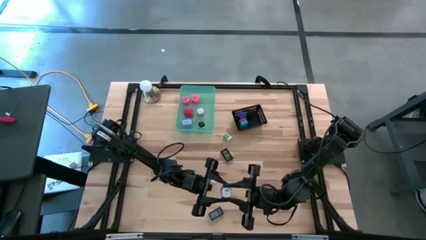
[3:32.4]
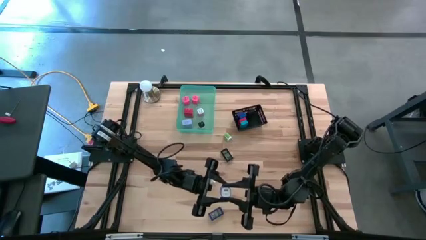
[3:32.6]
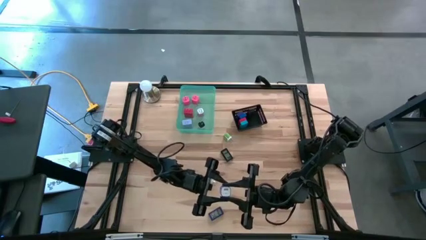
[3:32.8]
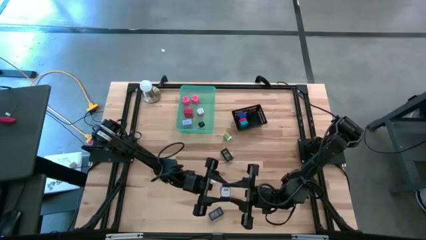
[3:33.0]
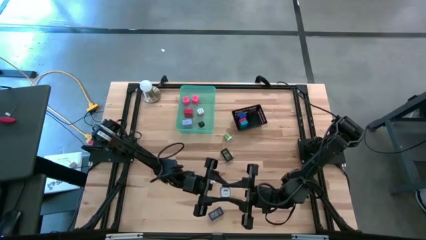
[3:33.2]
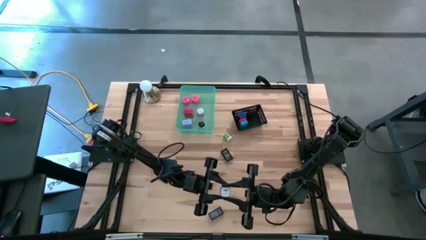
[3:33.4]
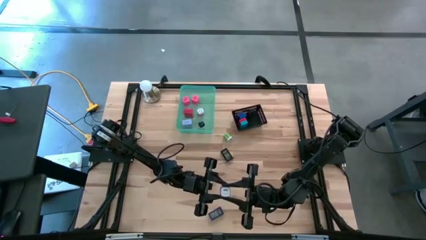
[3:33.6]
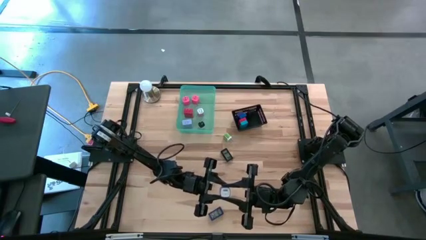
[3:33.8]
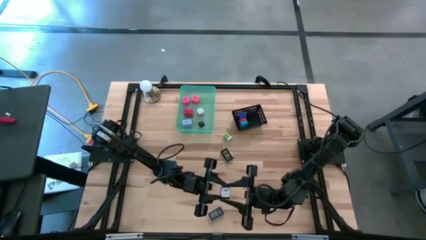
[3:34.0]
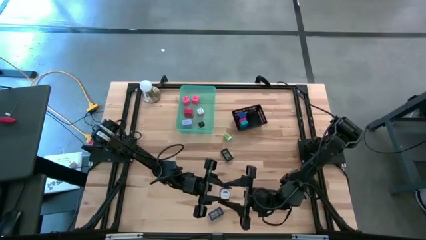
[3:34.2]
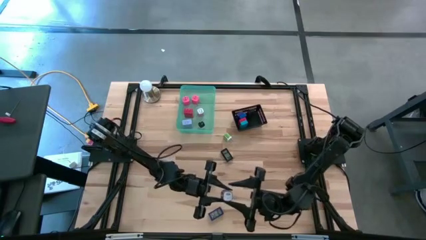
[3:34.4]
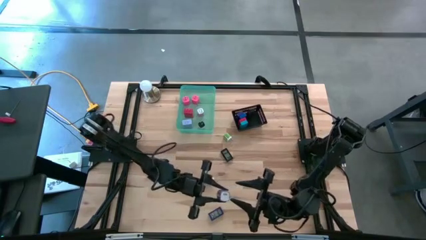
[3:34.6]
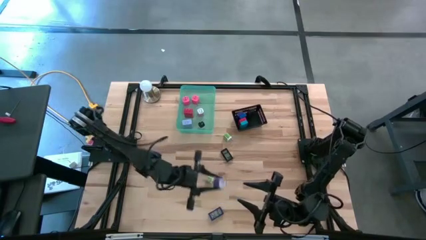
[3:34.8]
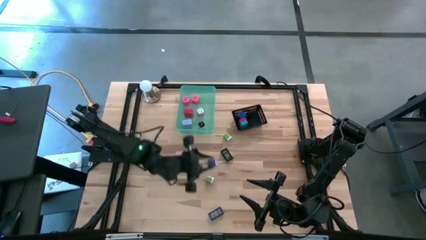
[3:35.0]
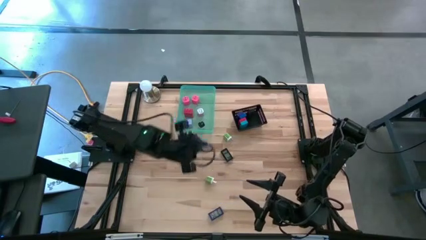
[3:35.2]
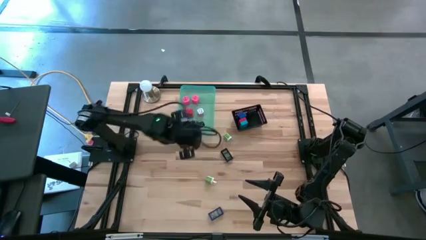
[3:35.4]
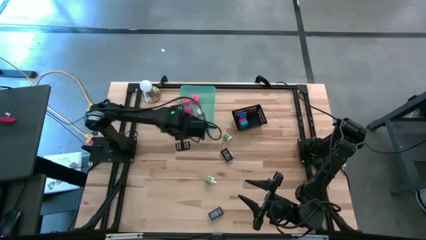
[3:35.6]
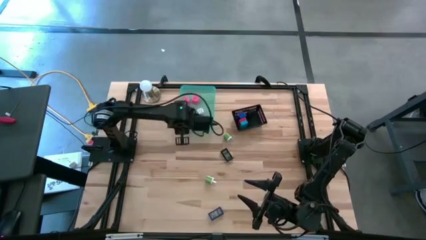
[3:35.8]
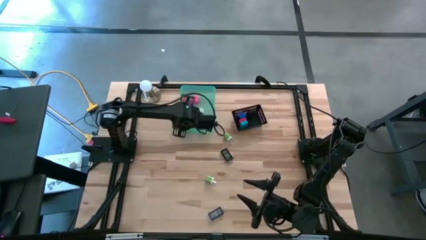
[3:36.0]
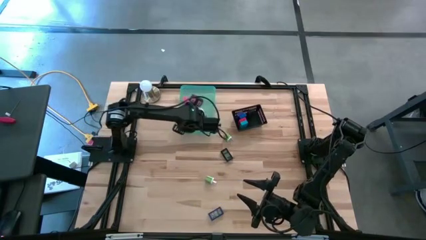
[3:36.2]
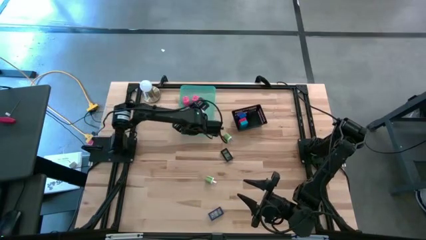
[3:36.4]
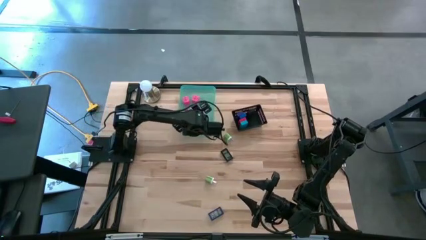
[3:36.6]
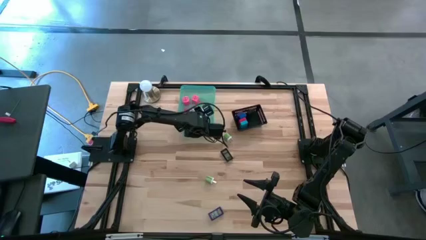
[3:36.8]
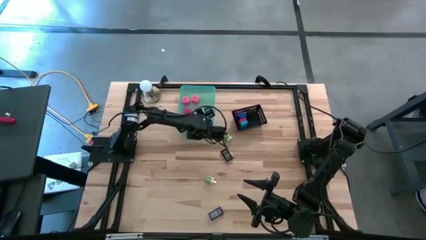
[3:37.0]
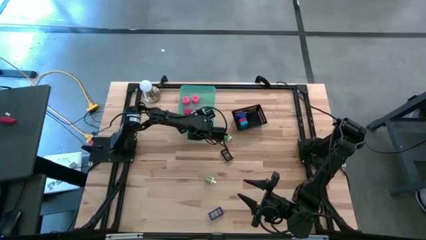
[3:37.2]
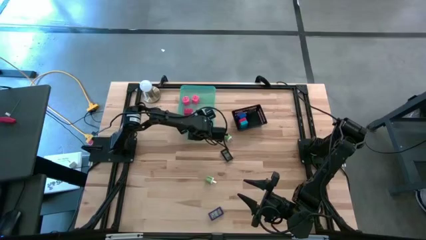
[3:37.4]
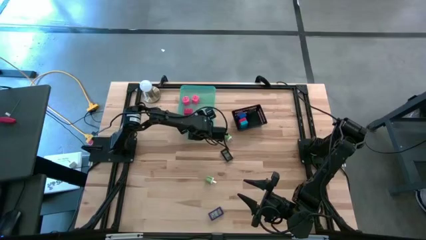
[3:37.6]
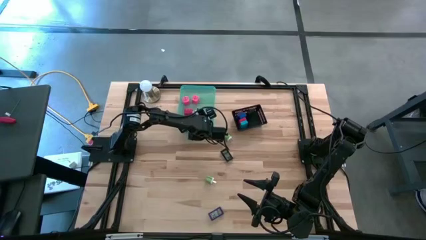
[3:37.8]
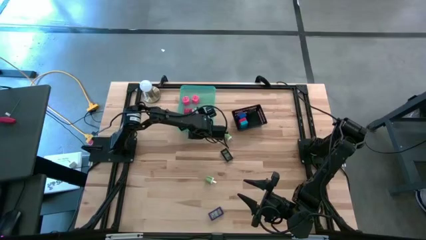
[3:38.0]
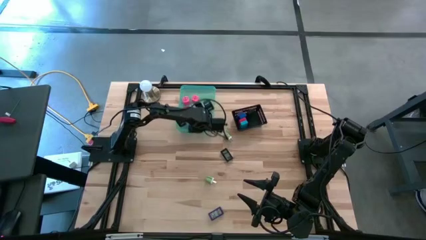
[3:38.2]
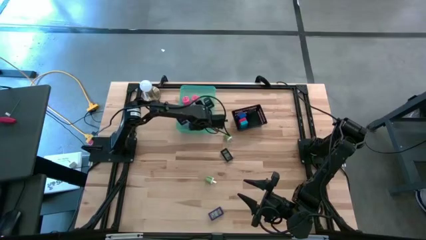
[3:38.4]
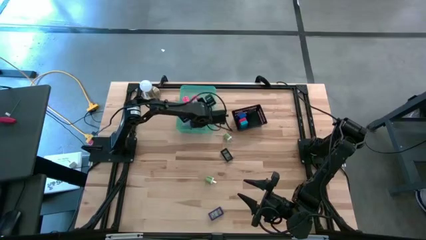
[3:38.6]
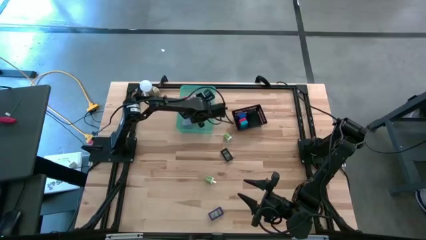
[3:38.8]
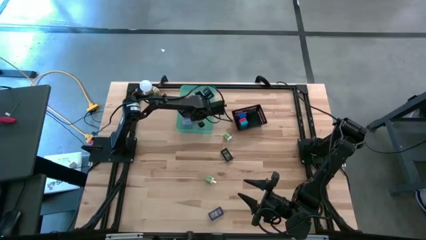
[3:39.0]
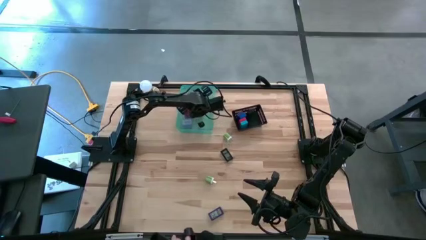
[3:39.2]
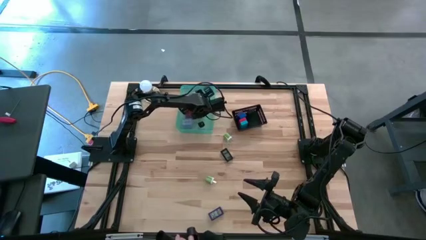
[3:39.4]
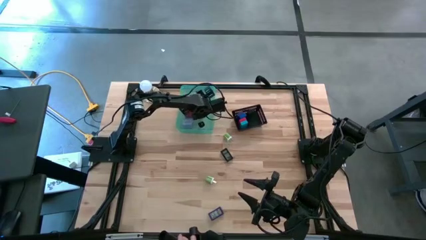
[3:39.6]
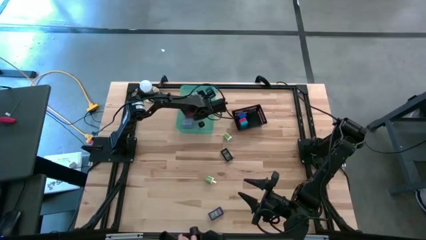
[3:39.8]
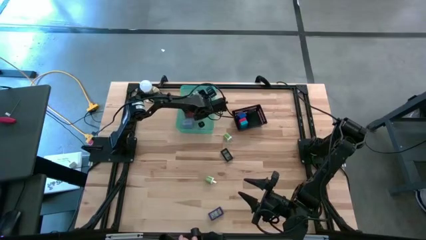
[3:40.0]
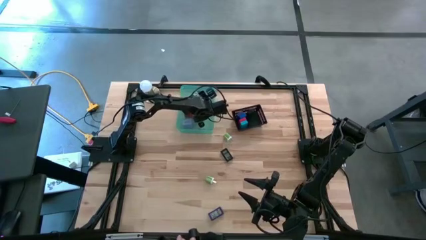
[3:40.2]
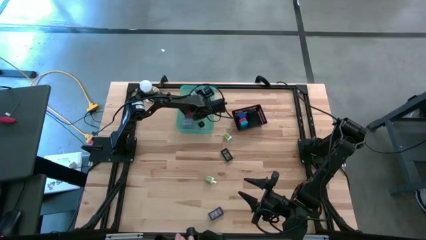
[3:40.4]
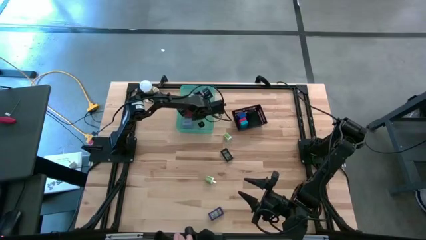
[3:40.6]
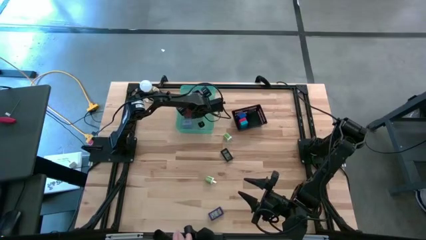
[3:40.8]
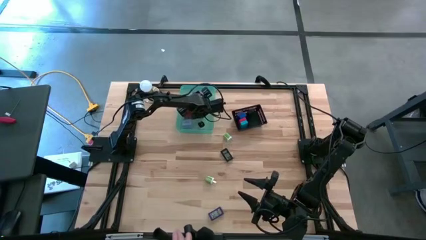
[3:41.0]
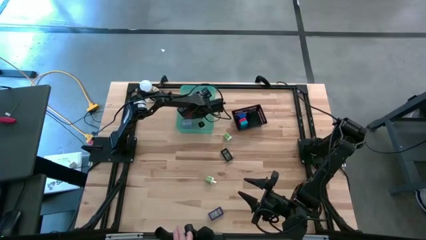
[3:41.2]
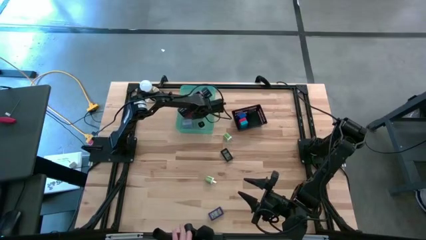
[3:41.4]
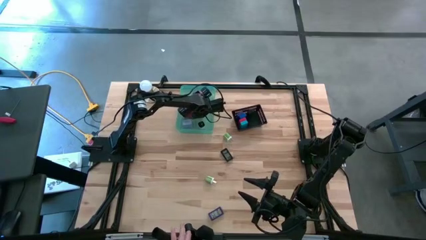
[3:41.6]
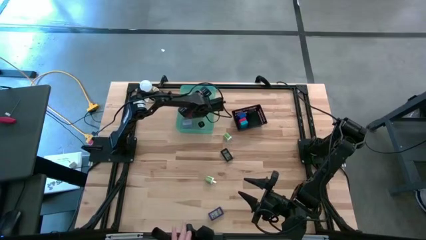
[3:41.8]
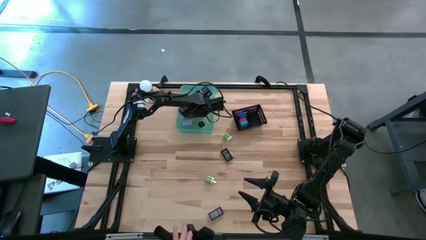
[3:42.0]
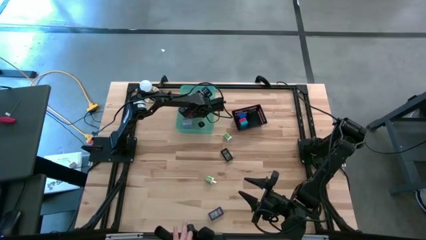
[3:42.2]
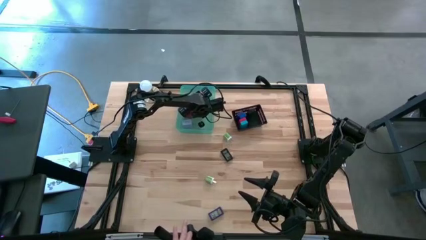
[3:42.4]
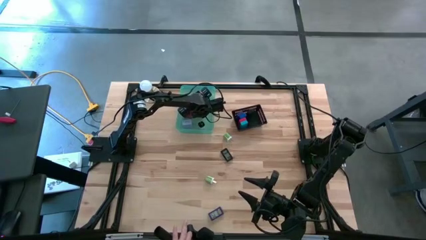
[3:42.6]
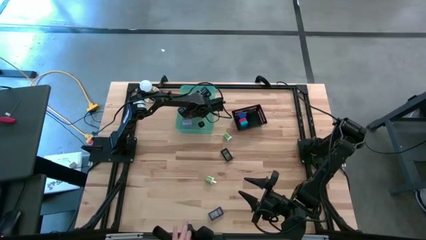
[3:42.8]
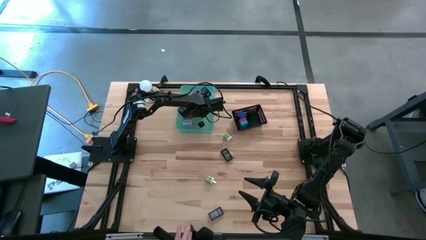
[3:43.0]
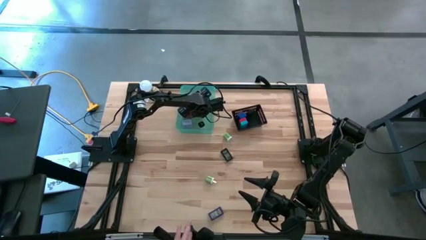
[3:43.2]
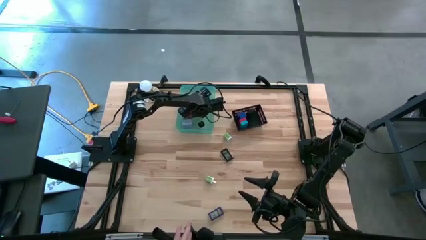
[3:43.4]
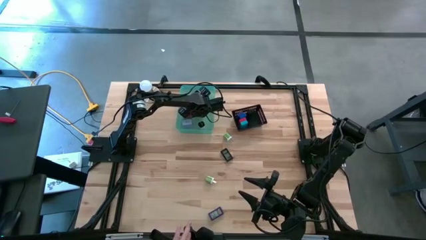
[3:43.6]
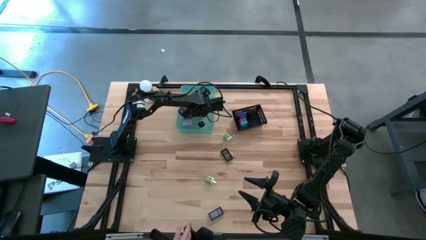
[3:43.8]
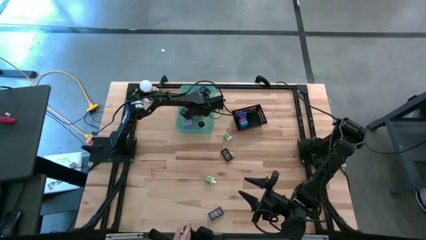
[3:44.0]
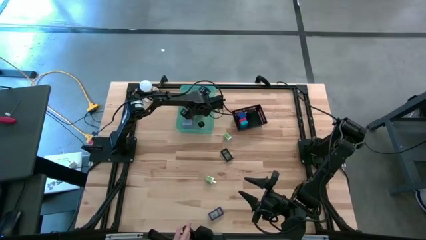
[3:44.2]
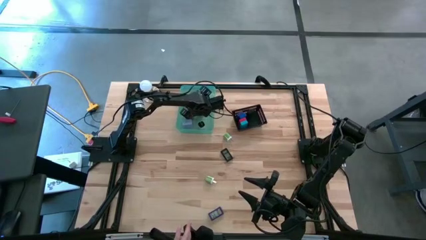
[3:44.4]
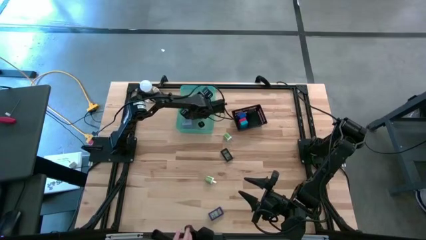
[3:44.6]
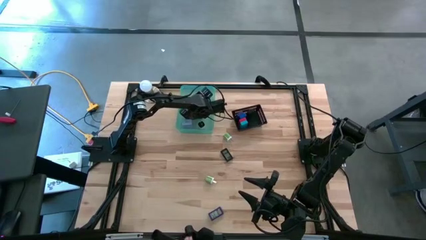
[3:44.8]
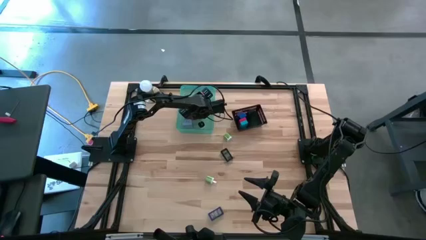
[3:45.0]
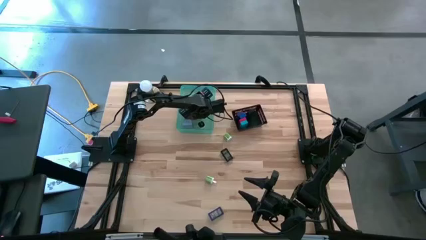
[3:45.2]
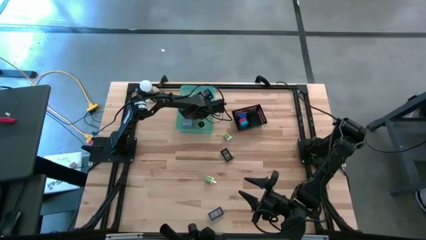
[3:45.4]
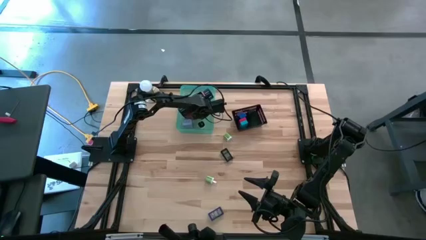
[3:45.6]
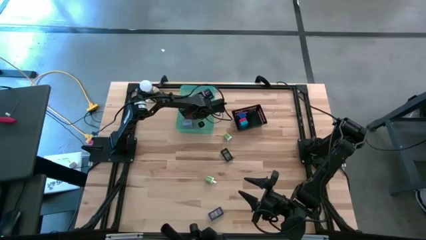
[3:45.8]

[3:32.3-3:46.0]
Task: Pick & Place Office items
Put the purple charger adapter into the green bin

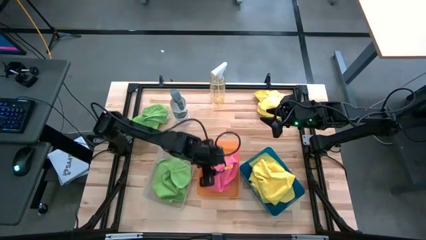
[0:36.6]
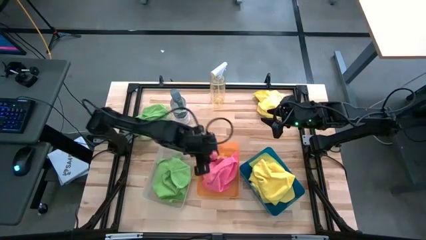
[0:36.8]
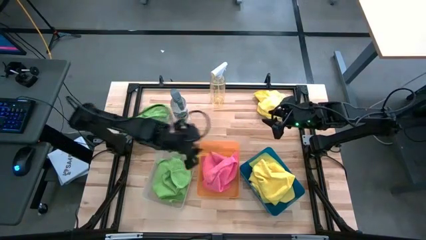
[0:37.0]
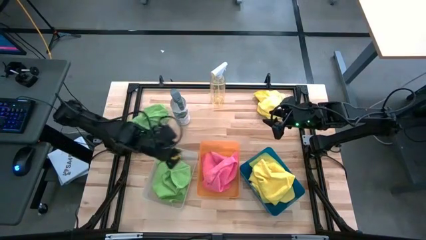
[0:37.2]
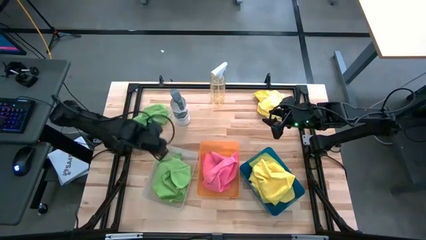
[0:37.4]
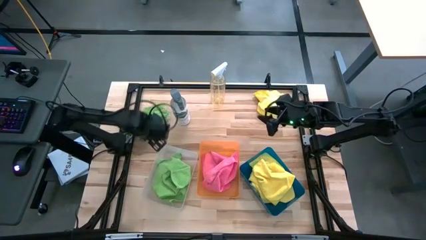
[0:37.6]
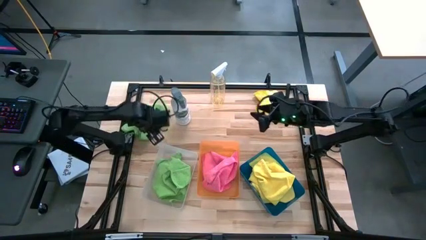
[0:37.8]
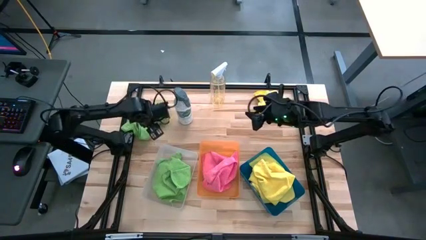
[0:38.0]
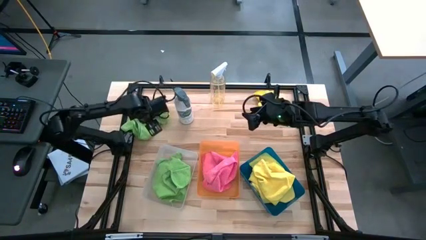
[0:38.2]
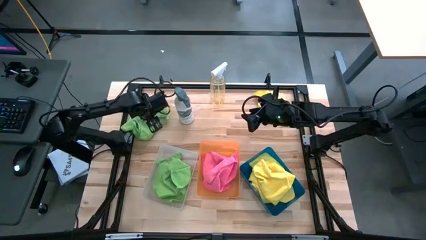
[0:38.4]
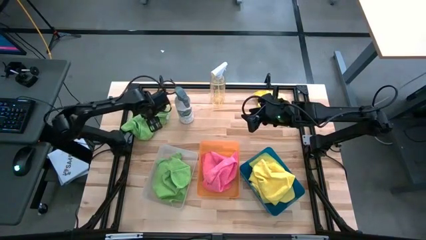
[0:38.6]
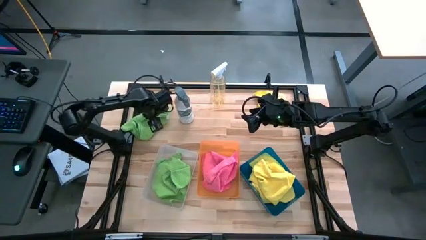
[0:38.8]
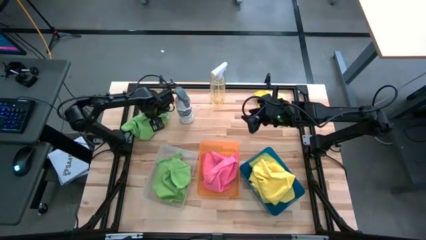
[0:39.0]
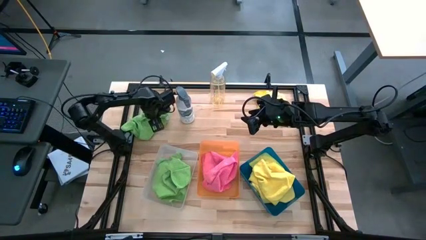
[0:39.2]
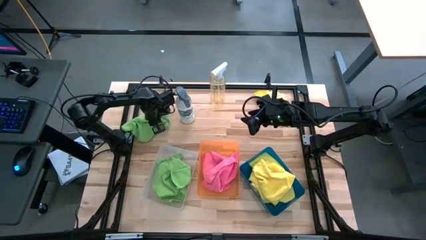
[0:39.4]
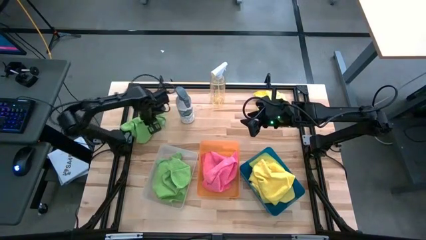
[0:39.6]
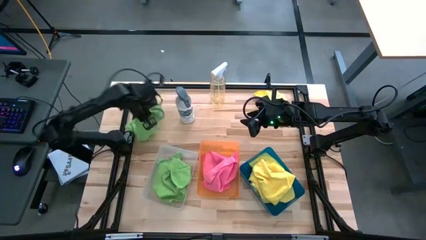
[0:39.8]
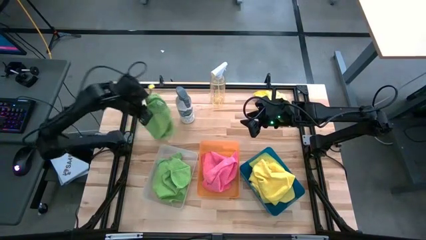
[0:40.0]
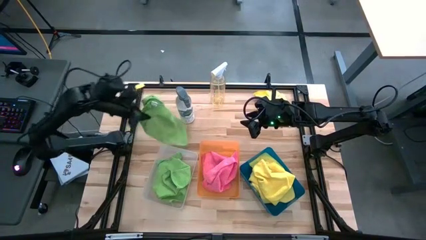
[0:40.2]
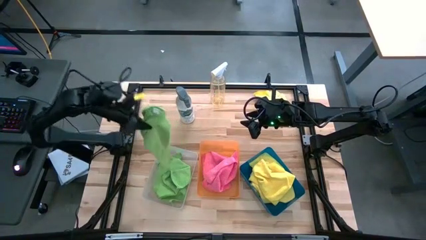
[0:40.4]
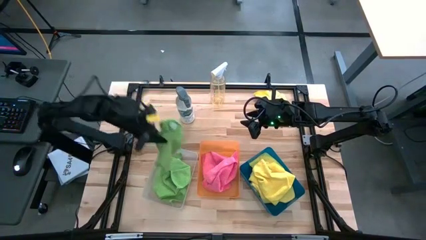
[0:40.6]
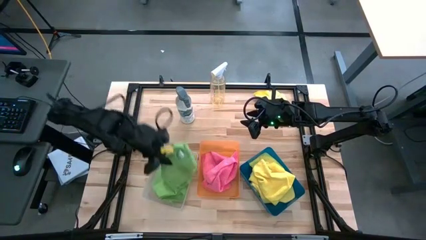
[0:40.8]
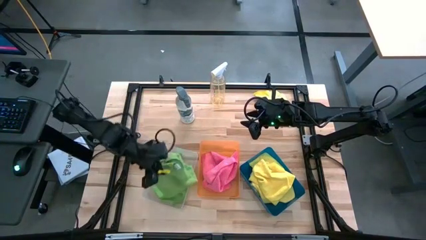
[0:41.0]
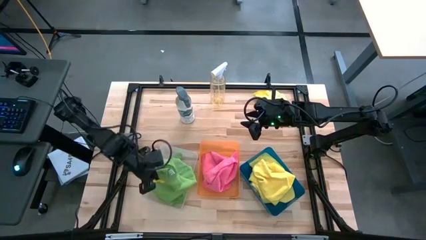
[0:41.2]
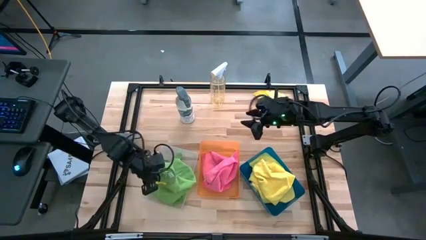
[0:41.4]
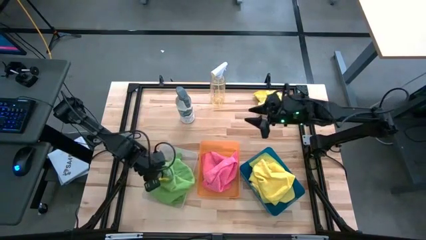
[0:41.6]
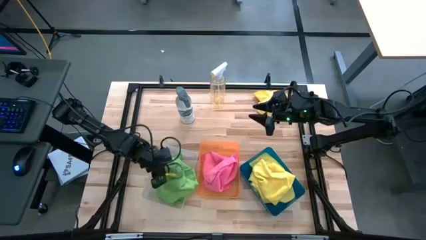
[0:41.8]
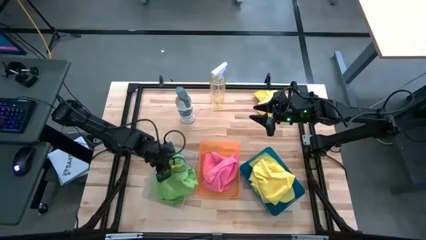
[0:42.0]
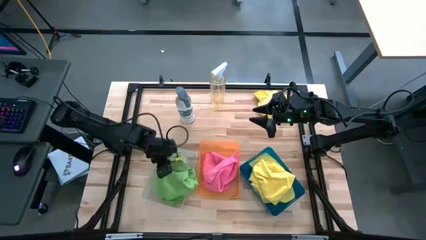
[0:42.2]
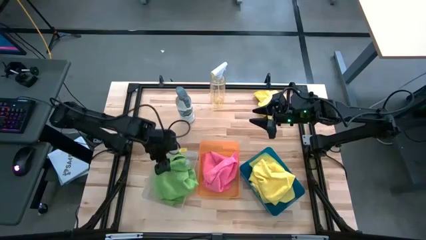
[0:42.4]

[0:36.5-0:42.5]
Task: Sort microfiber towel by color & place in baskets
Put the green towel into the white bin
